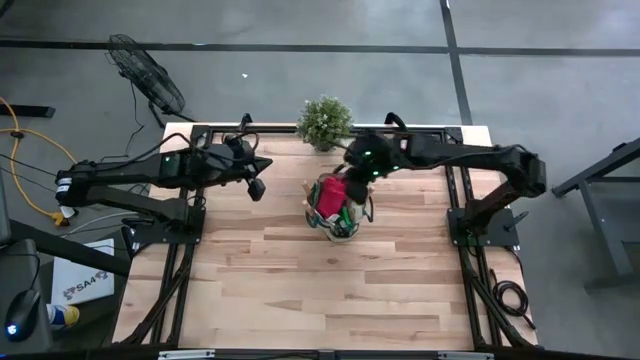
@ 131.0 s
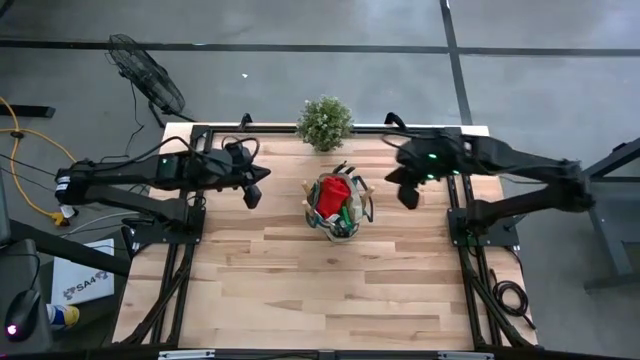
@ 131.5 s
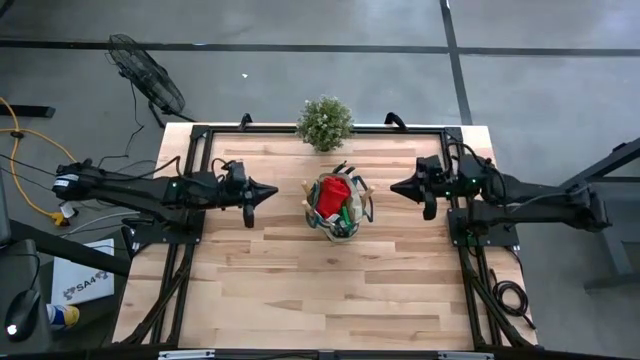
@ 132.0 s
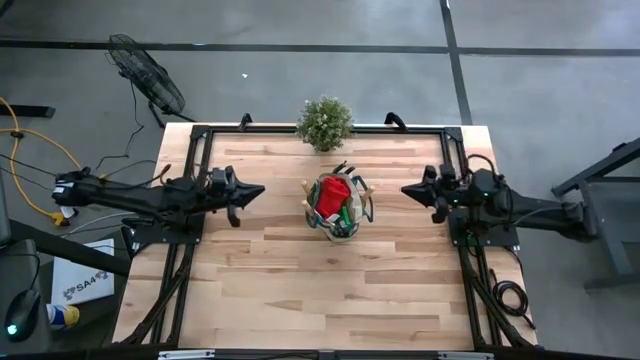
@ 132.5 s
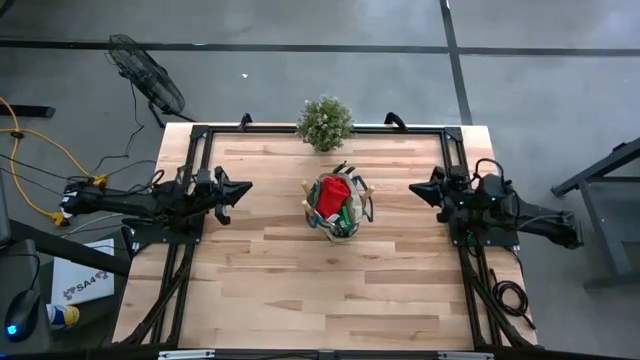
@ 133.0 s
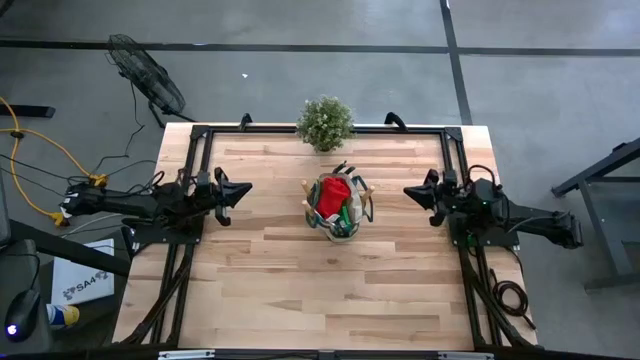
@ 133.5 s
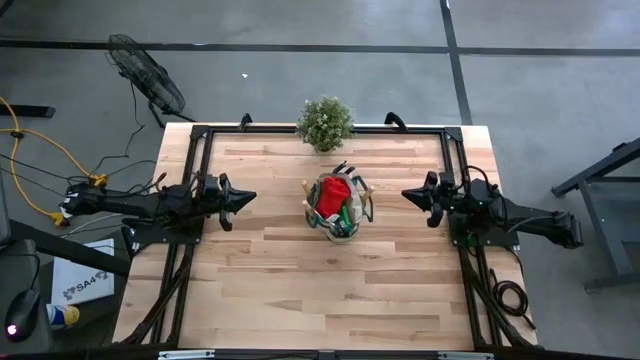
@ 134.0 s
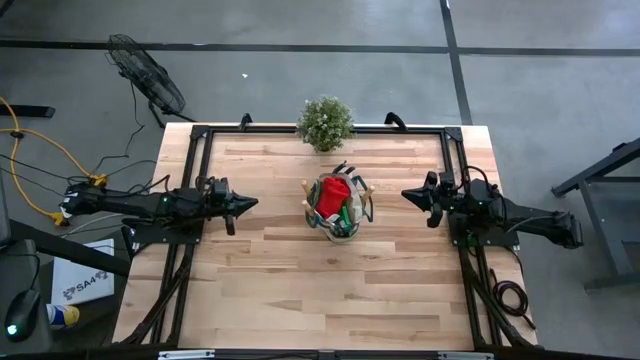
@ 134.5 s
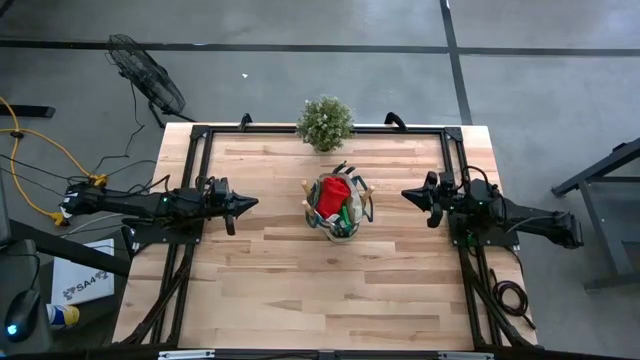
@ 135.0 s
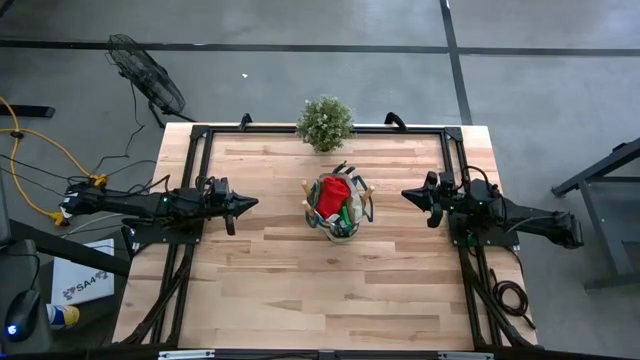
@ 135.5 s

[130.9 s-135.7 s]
Task: Pick & Place Garden tools in Gardening bag
Return to Home Position

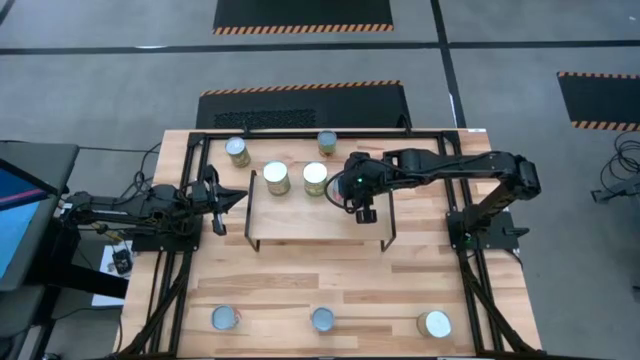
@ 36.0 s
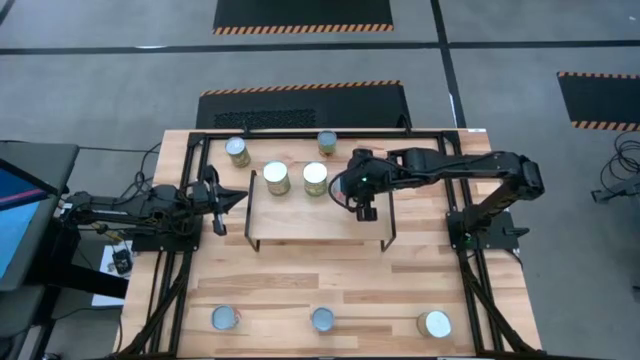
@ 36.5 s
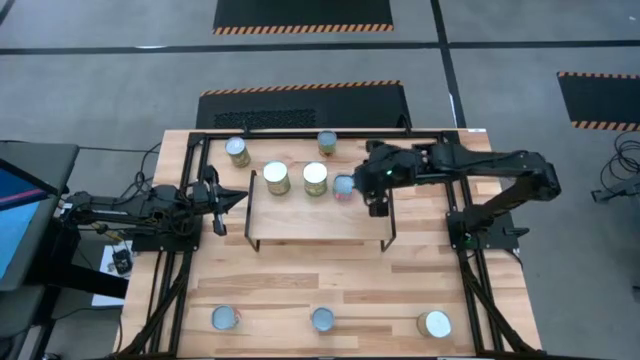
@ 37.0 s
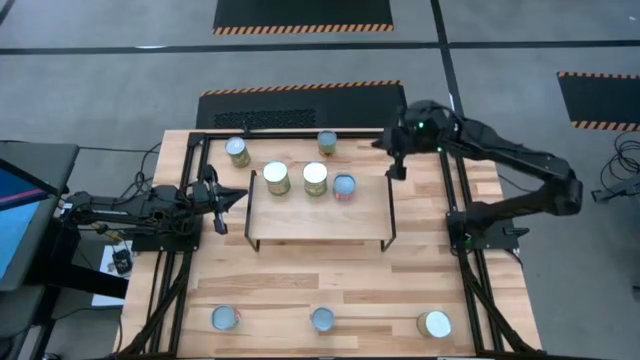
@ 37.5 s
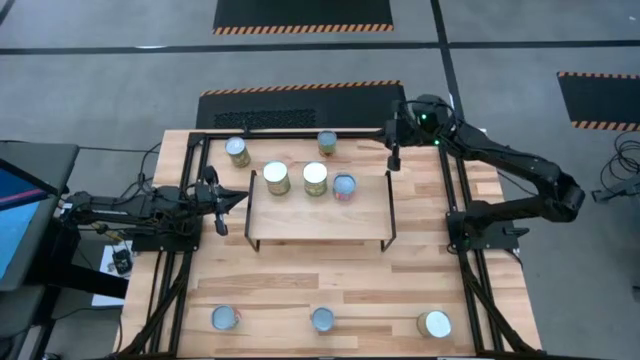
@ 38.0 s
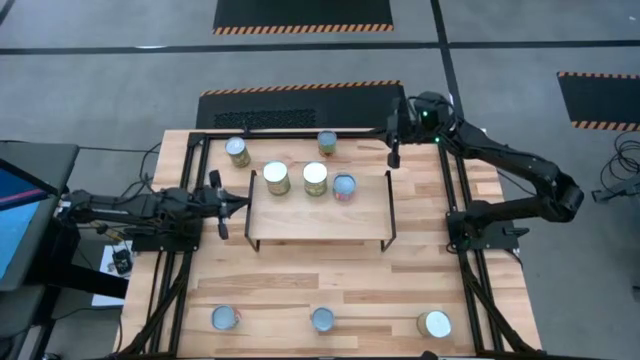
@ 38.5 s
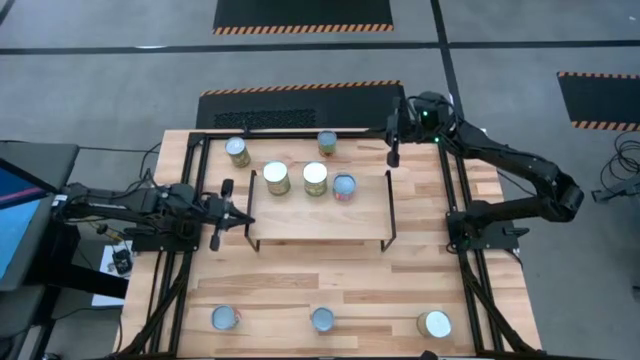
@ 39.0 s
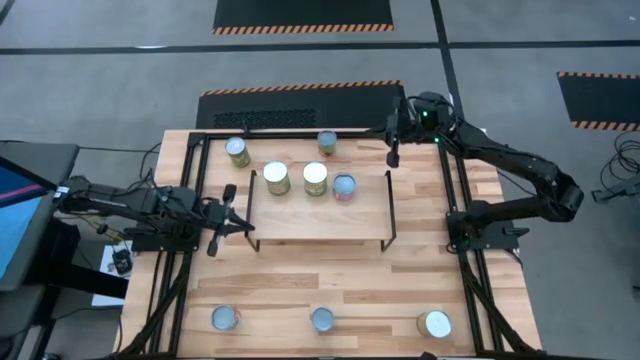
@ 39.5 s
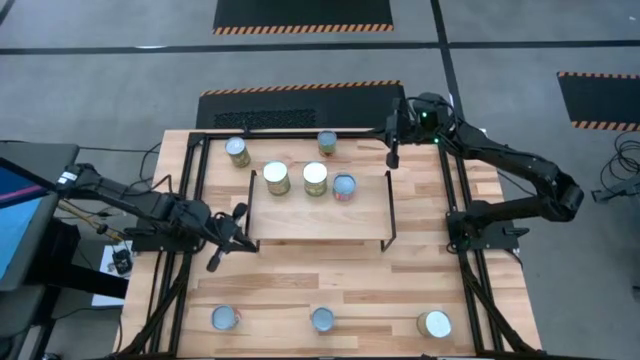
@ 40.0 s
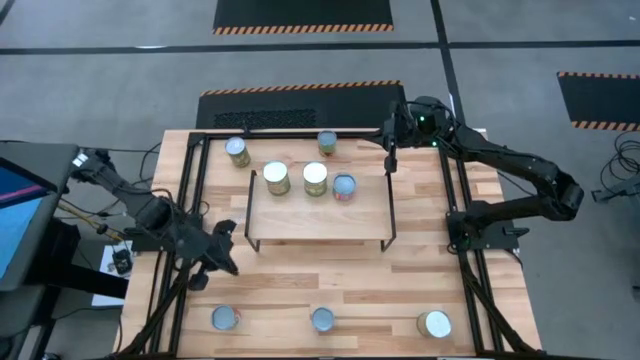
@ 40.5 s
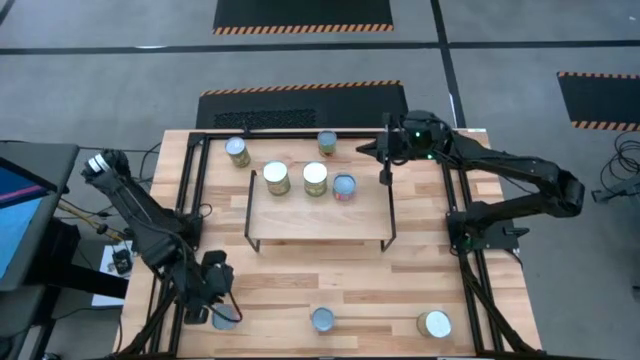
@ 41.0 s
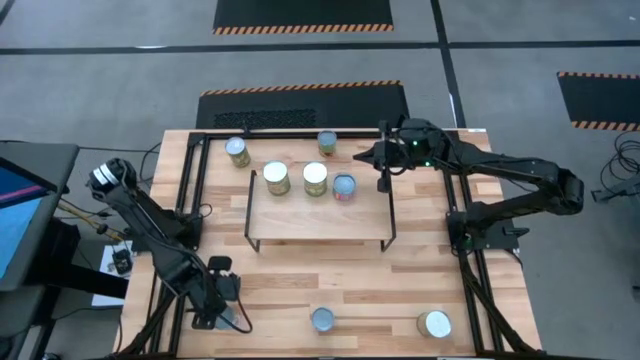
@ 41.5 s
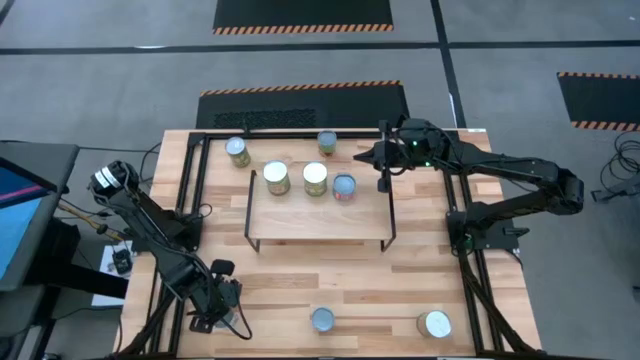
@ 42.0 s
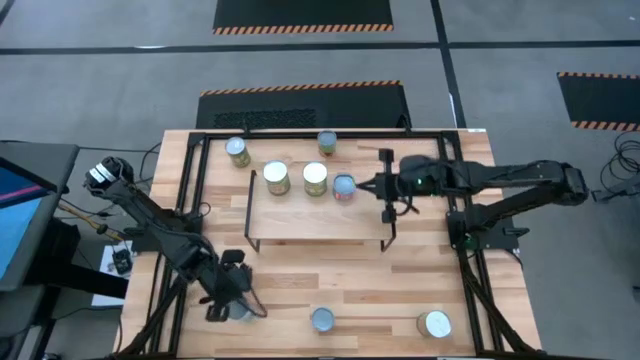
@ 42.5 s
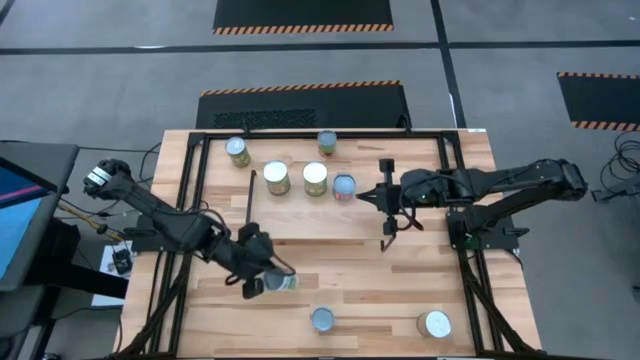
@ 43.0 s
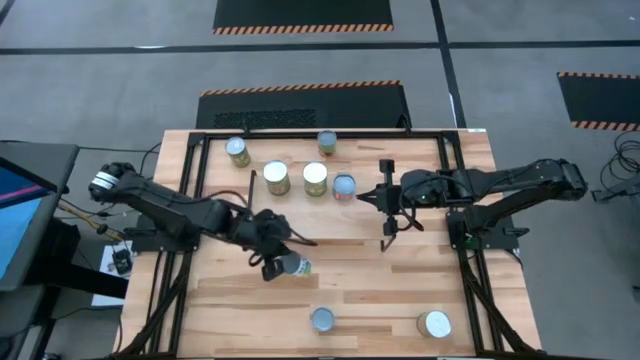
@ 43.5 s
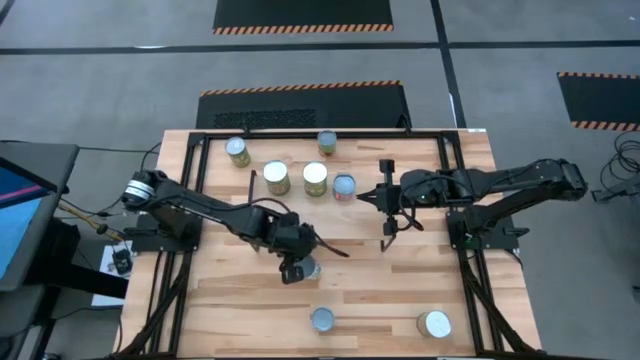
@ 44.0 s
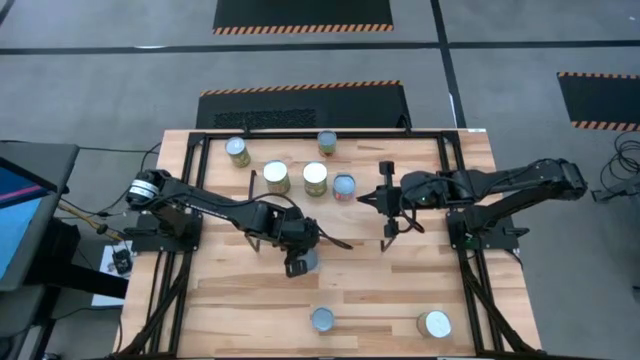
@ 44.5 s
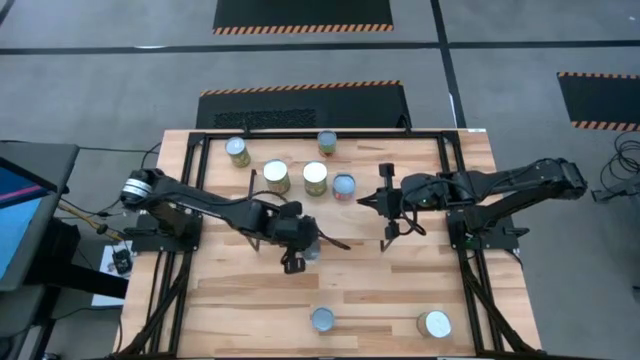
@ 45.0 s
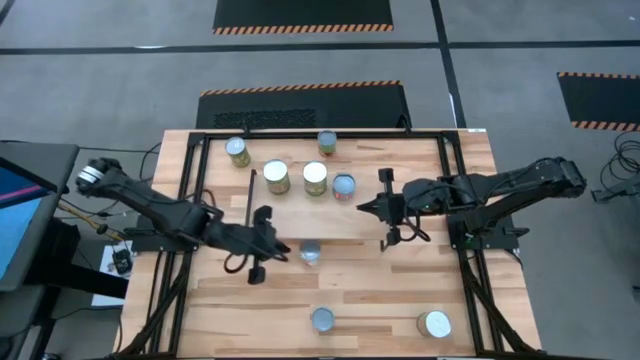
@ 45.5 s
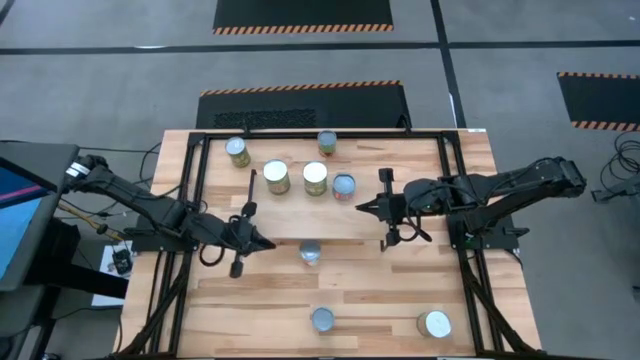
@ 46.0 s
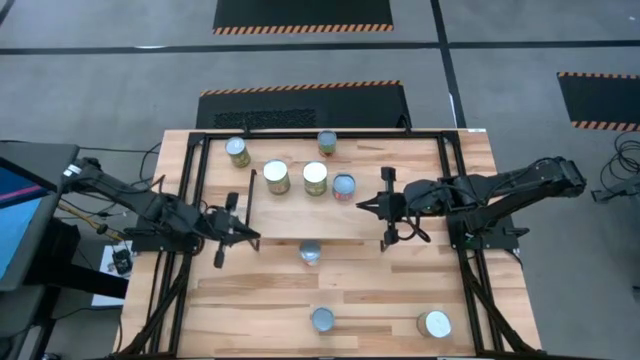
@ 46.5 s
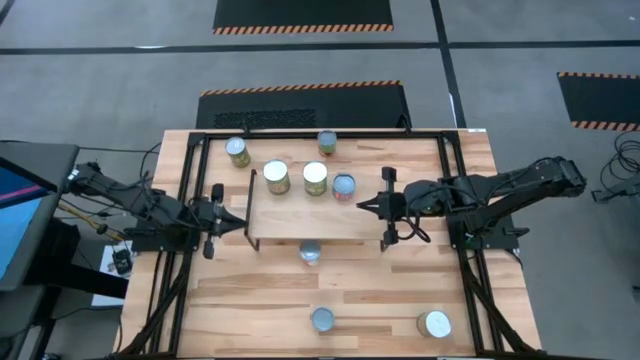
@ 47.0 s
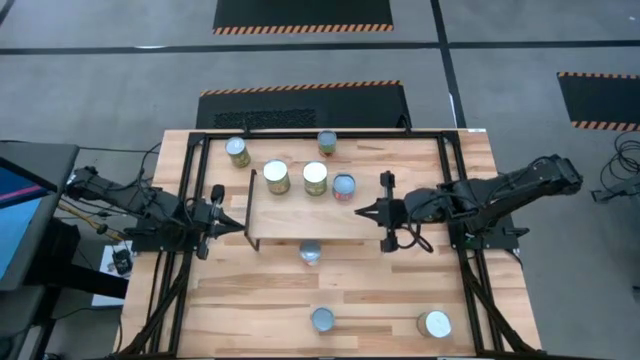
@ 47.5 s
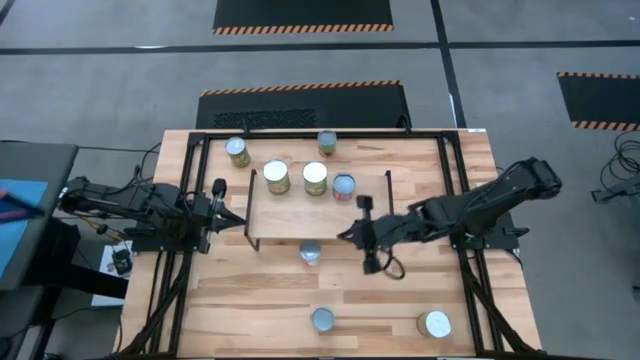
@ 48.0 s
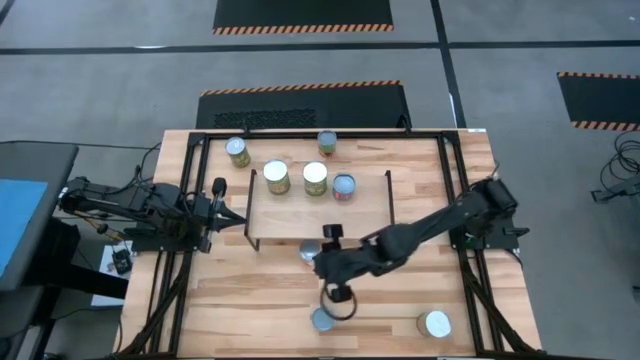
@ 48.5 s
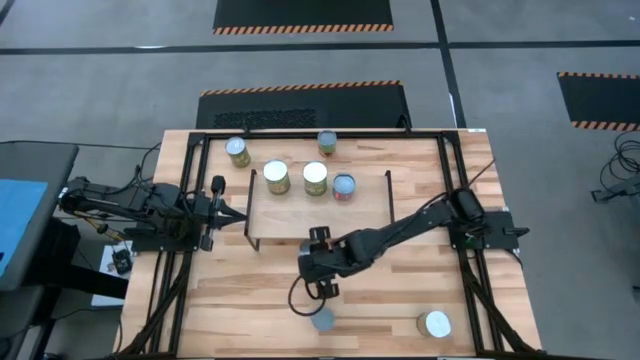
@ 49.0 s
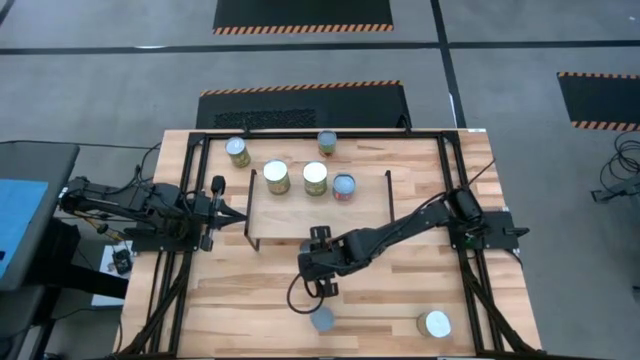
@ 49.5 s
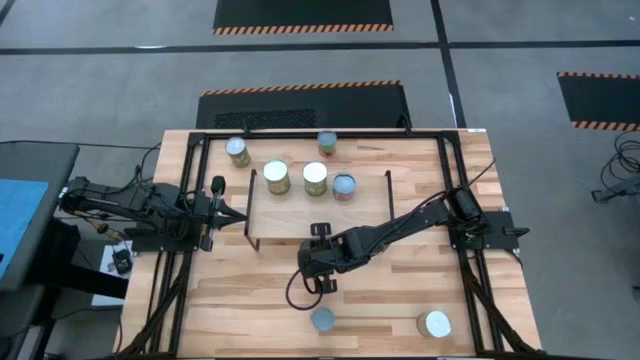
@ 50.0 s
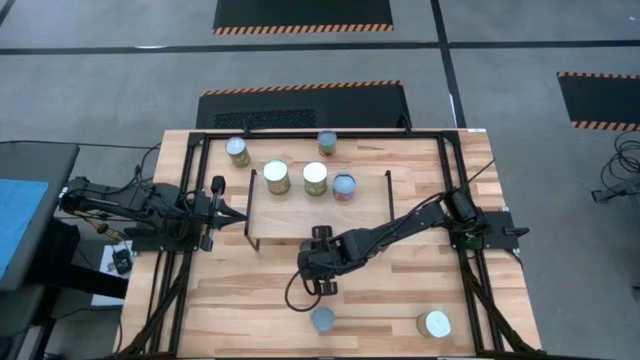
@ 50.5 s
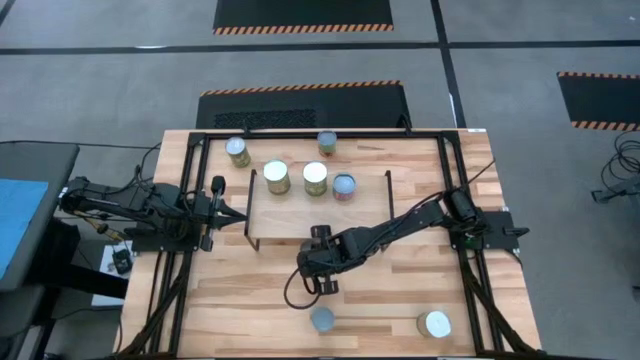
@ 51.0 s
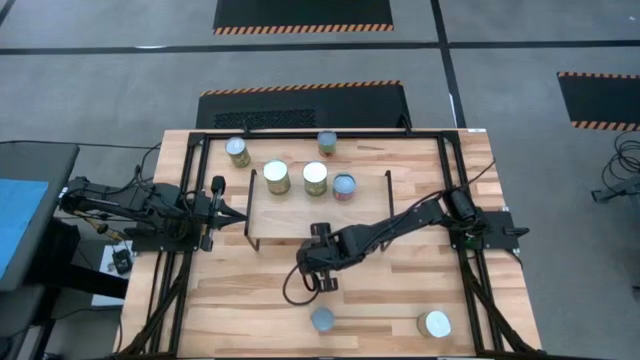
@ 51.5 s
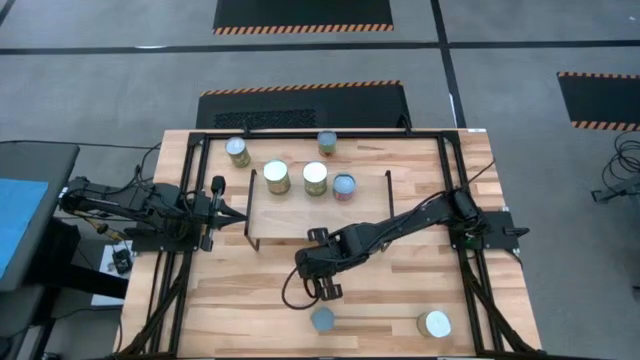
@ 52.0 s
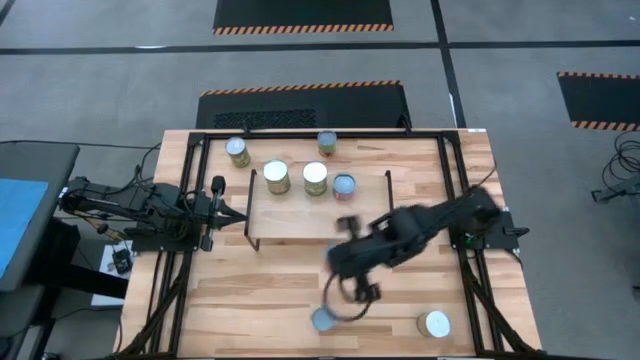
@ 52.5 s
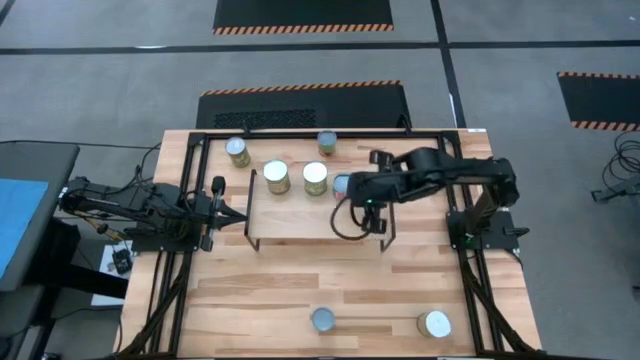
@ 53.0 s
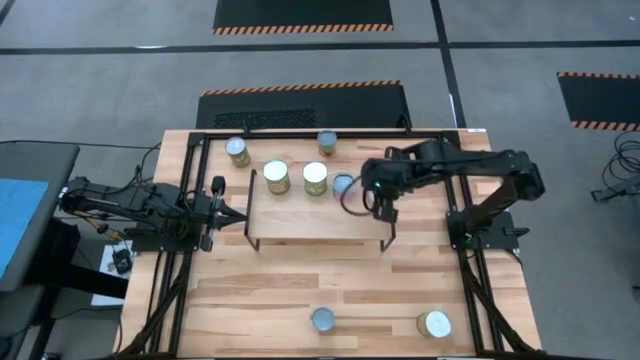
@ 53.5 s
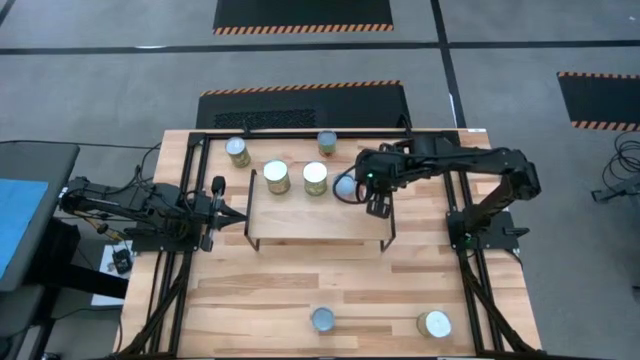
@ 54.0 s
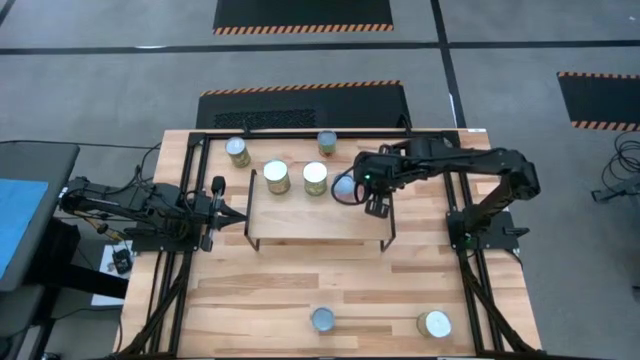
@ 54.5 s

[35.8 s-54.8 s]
Task: Pick and place cans onto a shelf
Put the canned pineapple on the shelf
